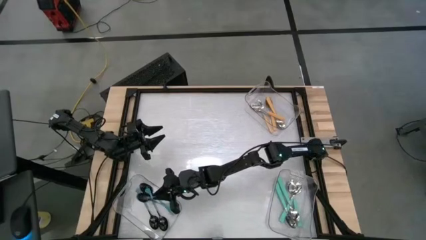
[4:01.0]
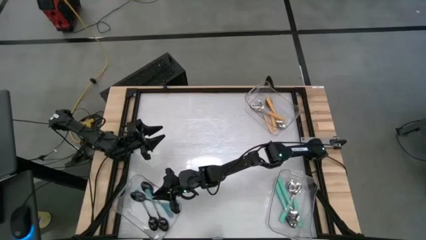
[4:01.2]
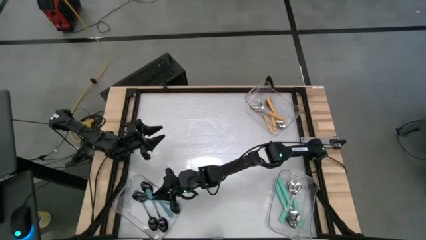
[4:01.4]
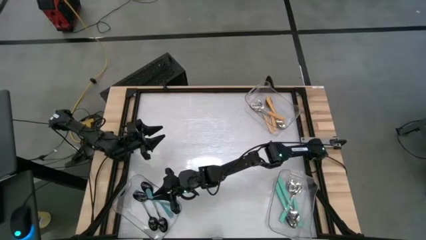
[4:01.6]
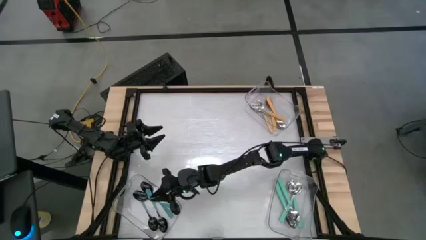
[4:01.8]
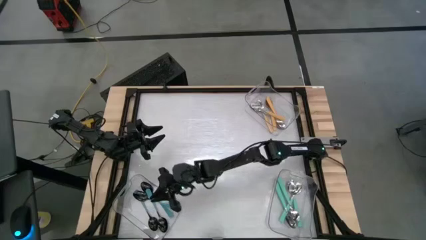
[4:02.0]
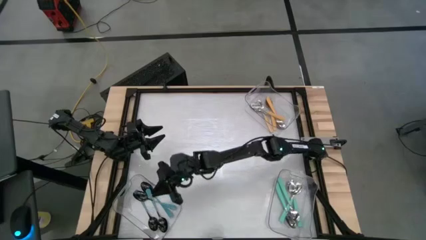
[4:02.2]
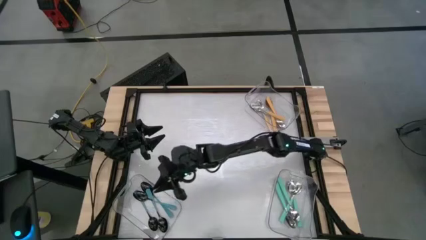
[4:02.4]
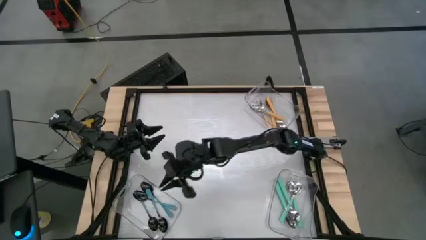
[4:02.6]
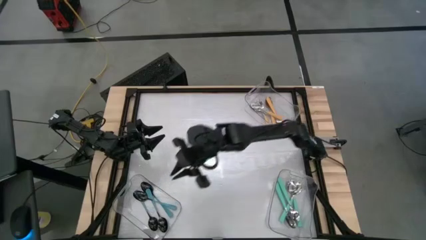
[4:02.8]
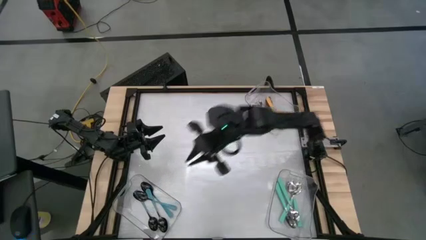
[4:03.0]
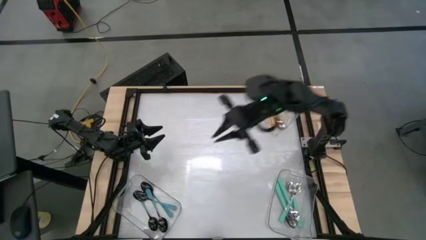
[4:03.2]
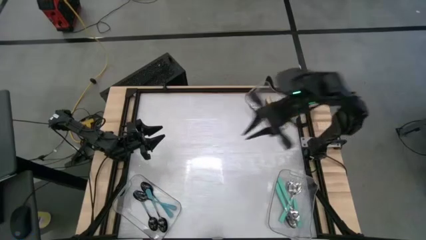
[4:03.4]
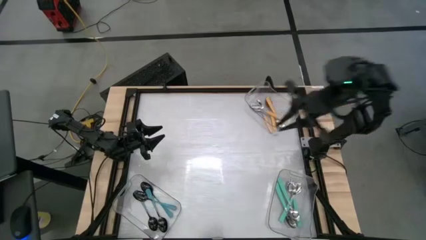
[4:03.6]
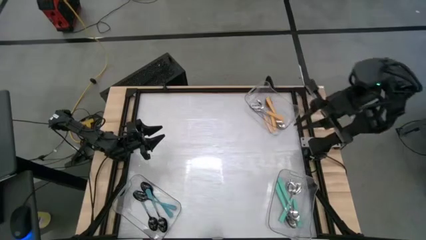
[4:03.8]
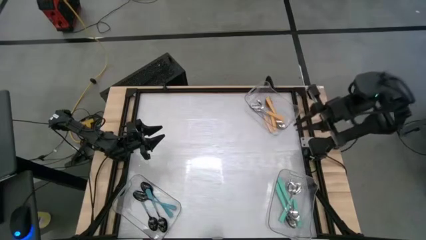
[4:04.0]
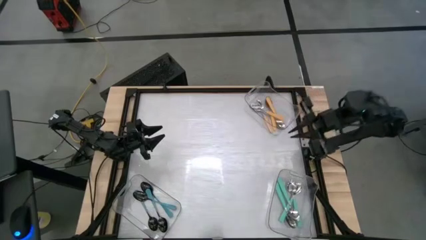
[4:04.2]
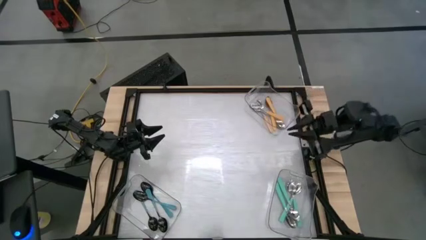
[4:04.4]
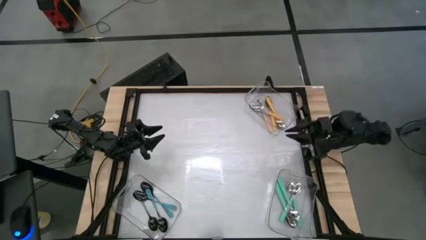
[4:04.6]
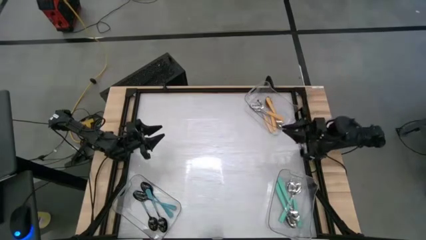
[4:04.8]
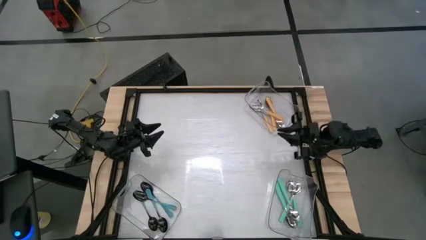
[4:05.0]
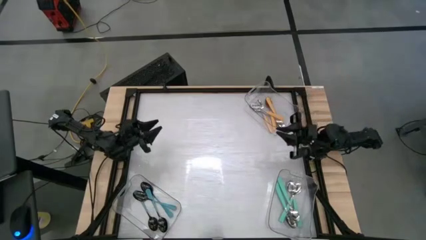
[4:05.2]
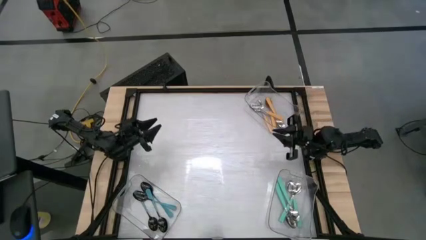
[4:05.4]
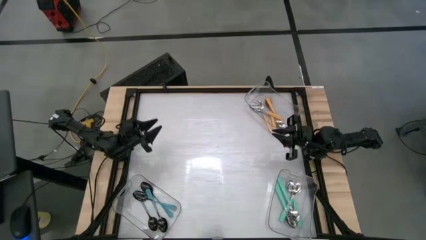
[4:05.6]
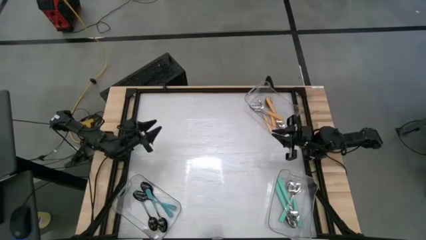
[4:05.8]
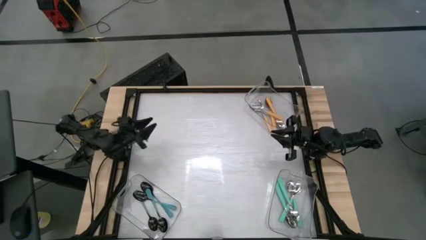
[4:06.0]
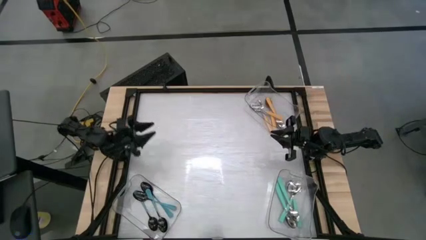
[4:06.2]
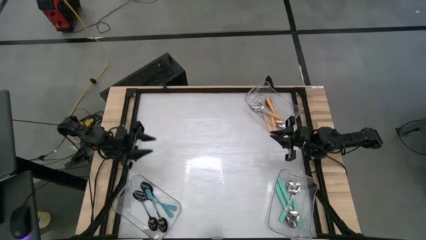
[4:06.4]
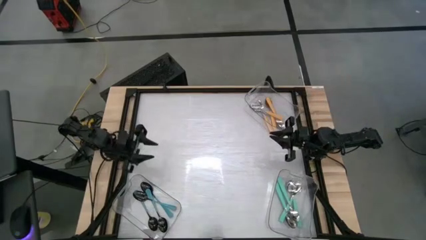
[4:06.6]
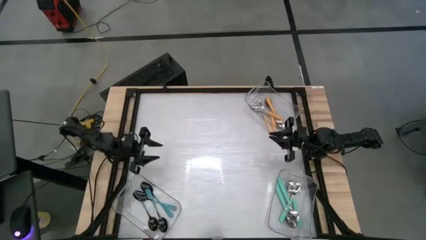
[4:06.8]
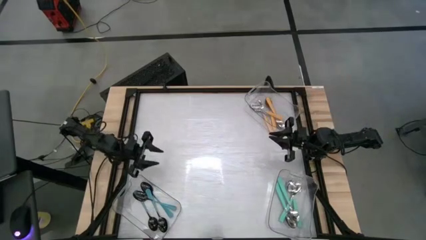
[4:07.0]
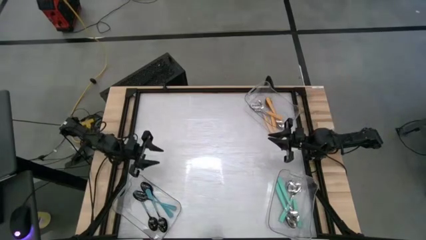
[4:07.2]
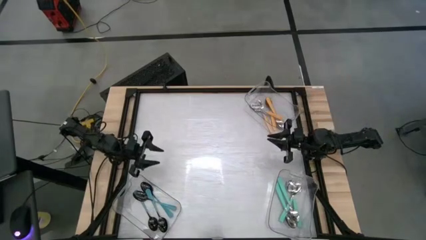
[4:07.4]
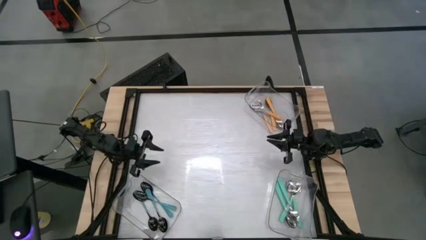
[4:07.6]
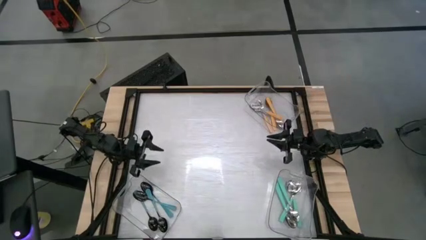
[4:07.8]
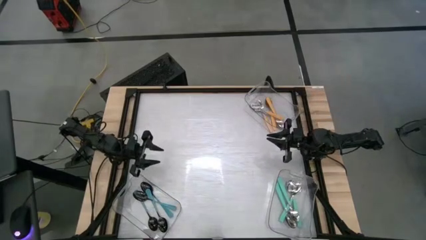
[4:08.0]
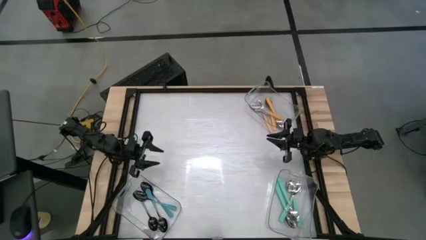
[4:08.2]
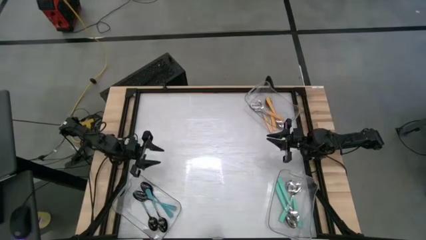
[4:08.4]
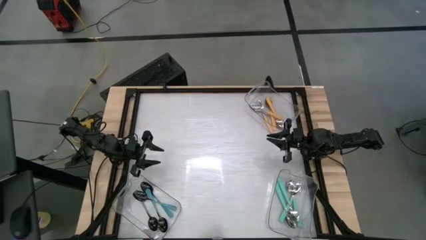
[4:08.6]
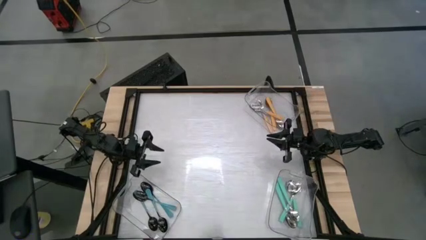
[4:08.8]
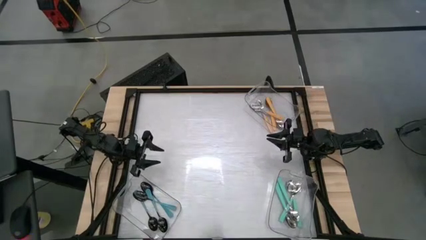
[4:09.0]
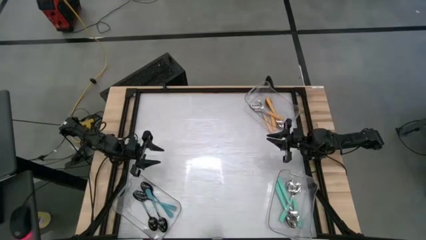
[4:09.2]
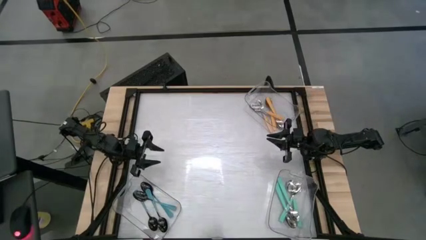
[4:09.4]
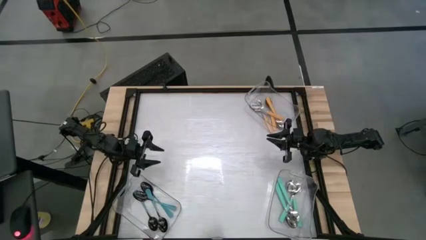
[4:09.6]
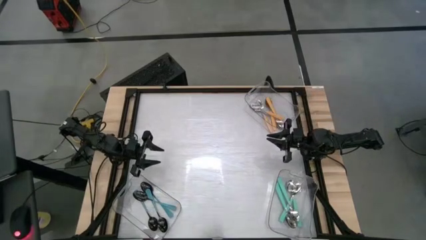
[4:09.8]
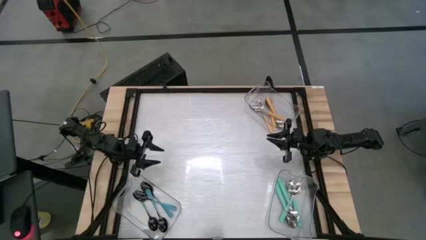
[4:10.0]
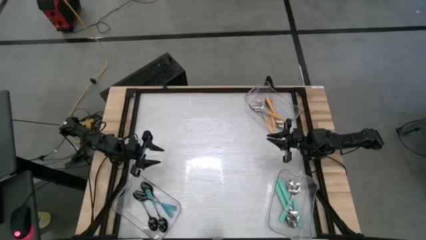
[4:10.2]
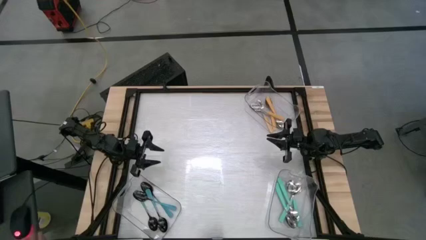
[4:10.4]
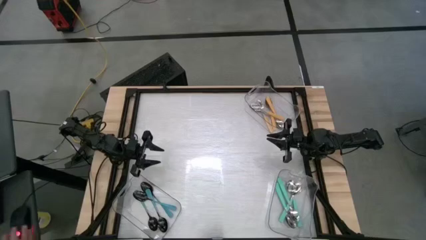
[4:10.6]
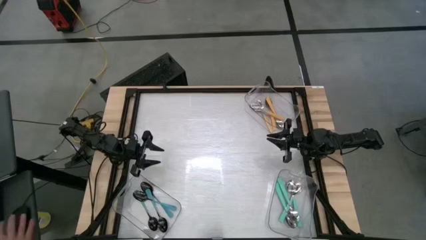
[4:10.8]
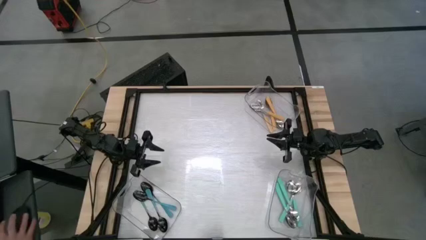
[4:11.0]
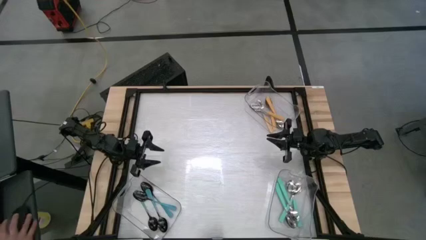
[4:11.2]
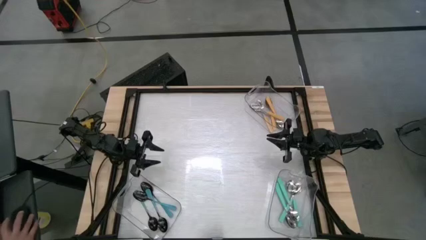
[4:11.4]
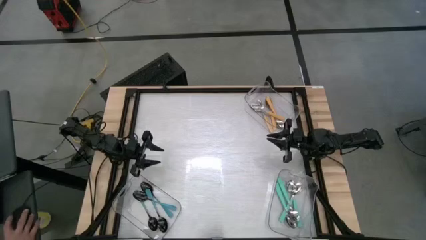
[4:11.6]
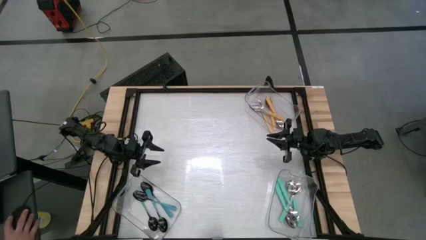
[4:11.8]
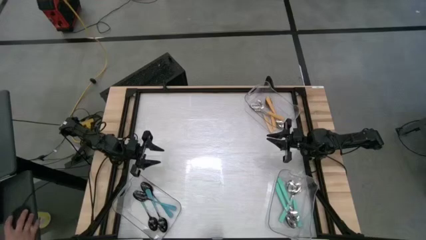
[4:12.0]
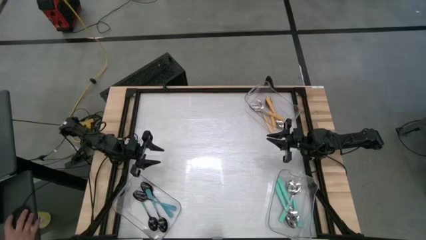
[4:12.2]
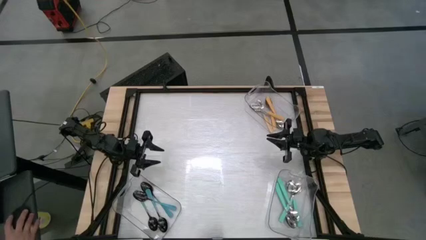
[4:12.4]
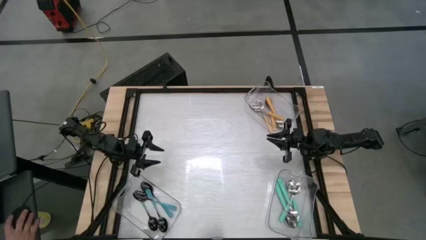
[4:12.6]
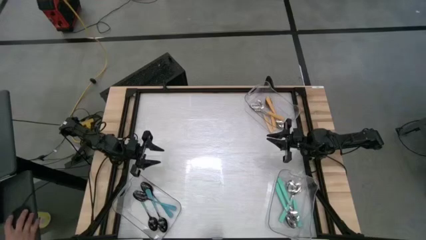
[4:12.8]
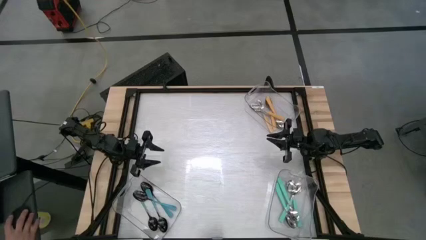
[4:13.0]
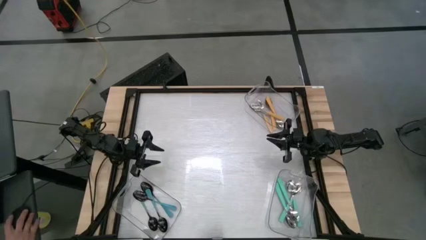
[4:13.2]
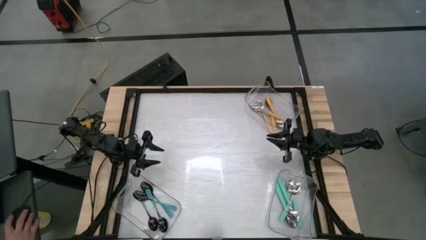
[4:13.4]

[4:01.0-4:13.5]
Task: Sort silverware by color (type)
Return to Home Position
